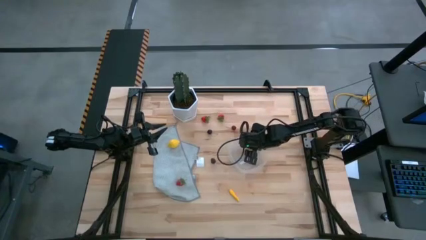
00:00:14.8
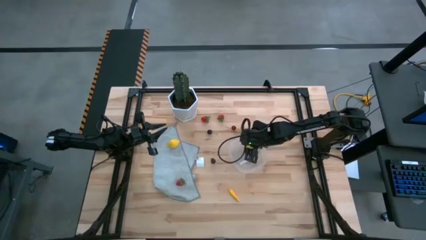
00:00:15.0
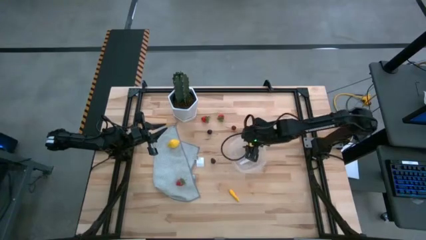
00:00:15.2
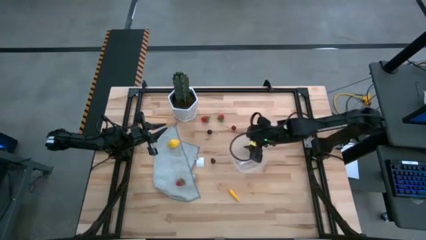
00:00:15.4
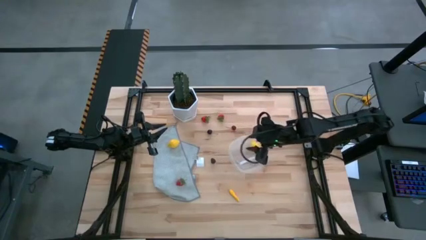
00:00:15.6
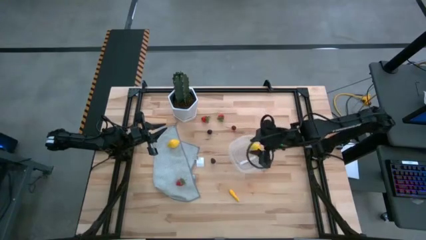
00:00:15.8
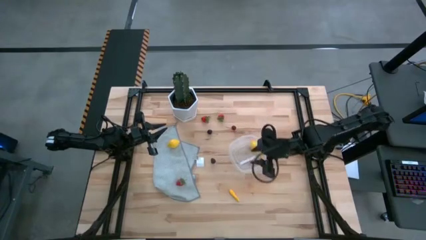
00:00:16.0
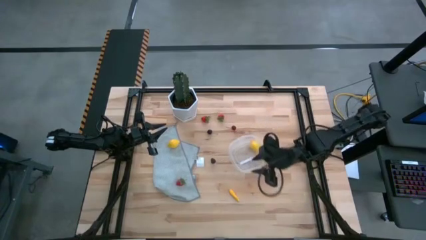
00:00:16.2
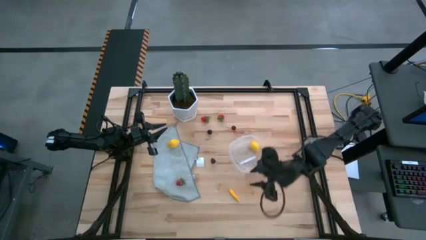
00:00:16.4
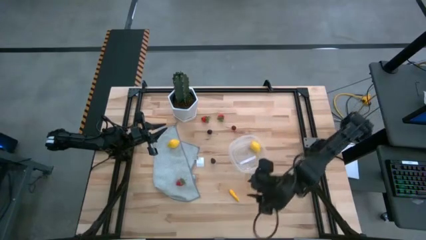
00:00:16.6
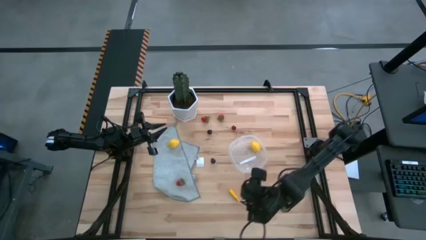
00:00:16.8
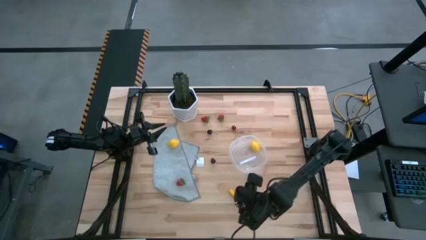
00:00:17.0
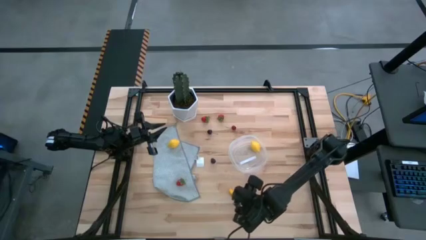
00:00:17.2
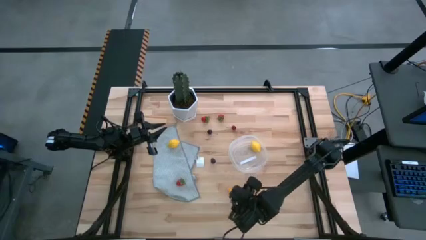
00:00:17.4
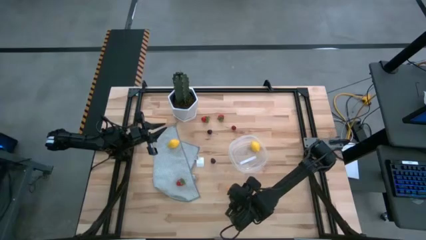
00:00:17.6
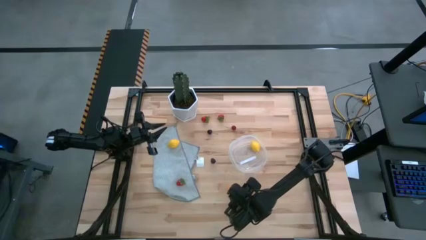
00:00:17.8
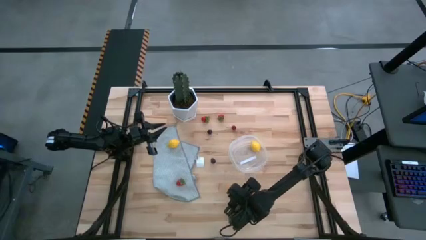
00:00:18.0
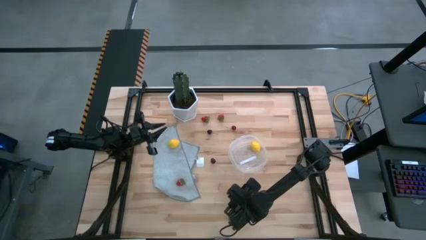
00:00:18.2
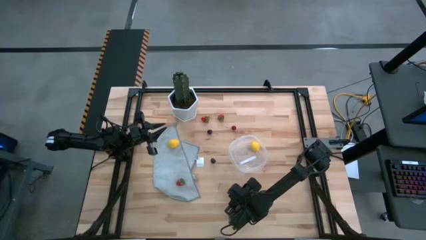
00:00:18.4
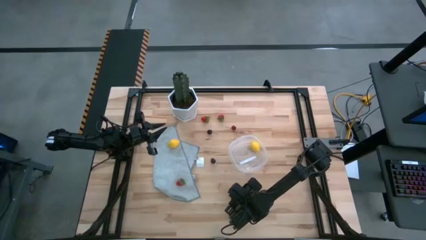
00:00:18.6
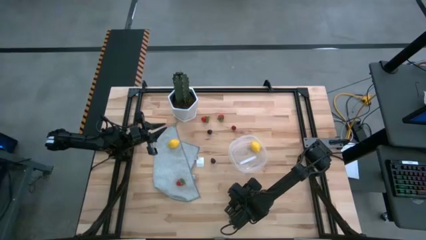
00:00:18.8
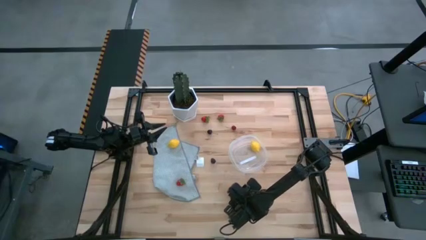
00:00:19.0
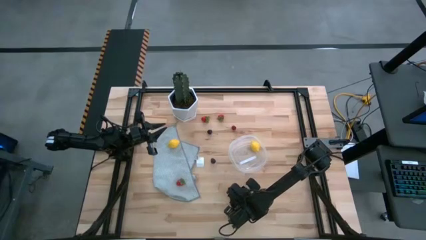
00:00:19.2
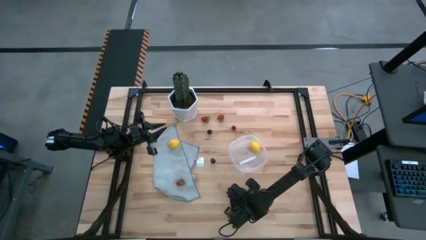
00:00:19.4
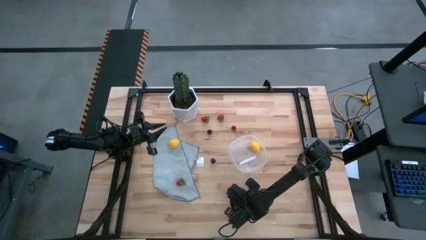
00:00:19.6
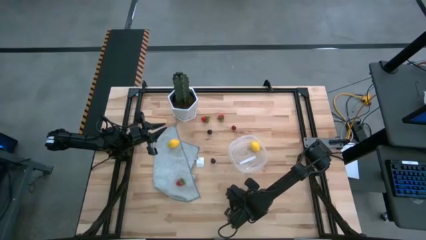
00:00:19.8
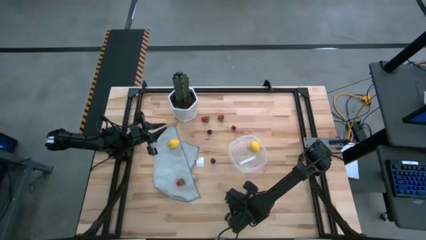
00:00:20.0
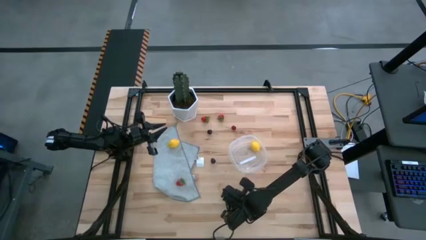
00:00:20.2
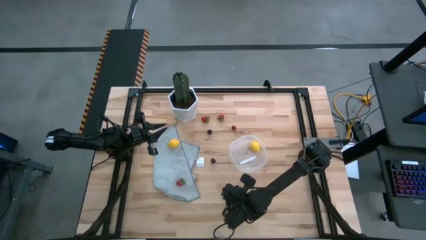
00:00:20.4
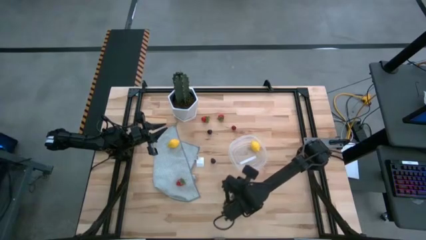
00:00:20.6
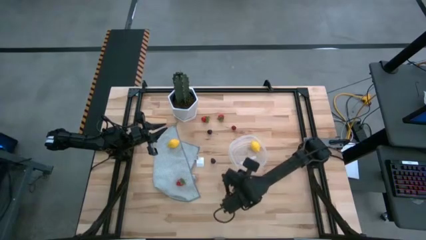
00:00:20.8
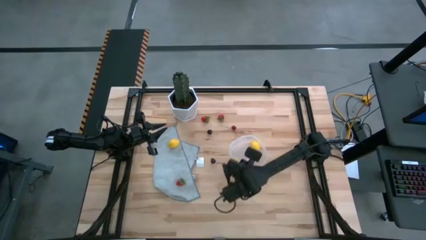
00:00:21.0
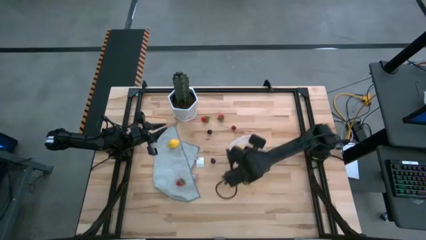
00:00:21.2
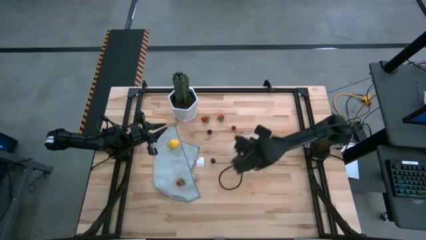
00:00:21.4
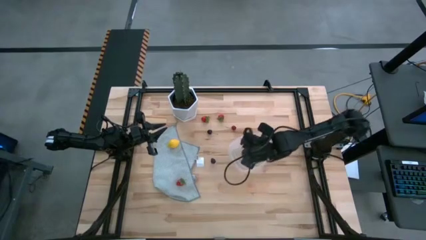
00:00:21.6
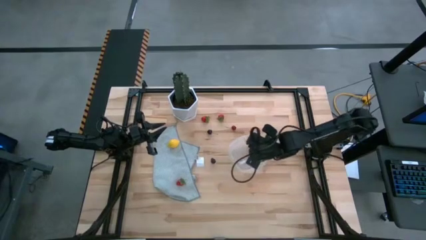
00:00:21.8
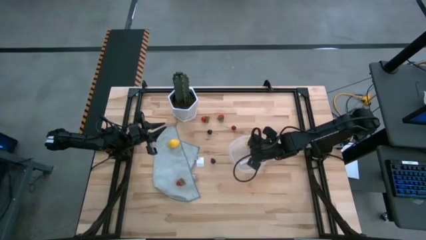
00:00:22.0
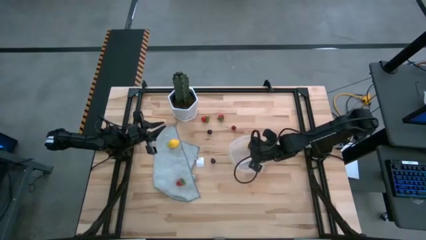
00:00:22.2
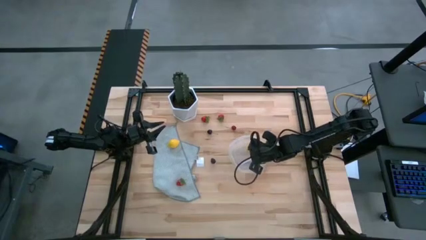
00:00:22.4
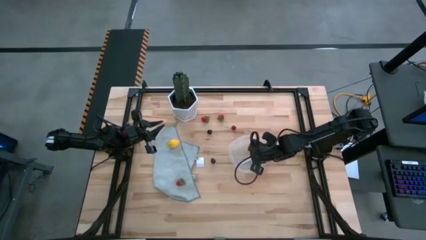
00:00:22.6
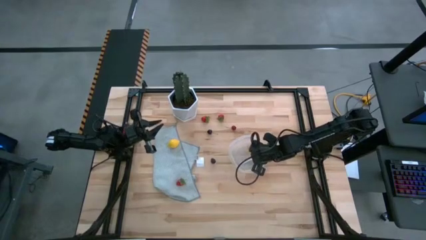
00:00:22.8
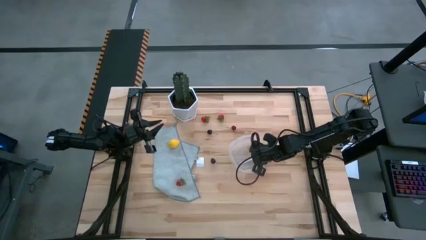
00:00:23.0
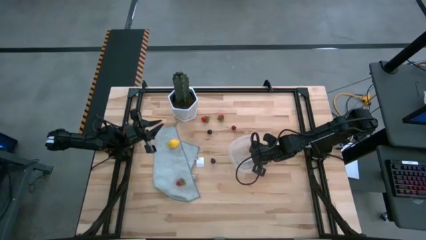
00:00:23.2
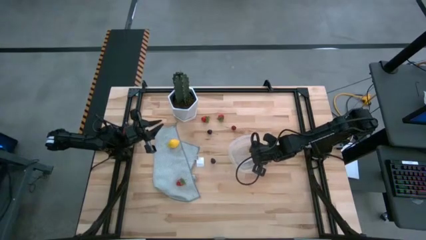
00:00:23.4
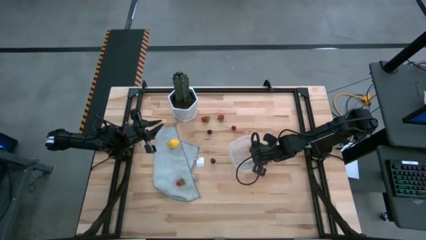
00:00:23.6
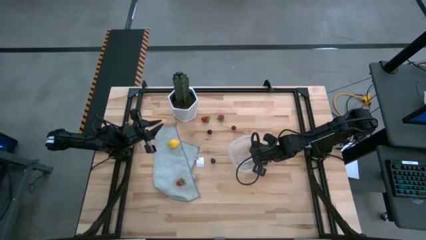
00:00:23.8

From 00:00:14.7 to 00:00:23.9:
Task: Pick and placing Produce into tupperware
Put the yellow corn into the transparent container

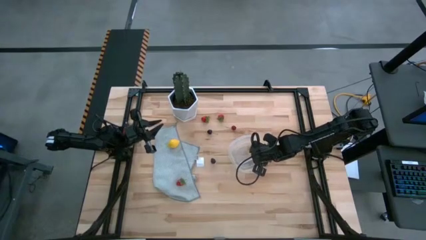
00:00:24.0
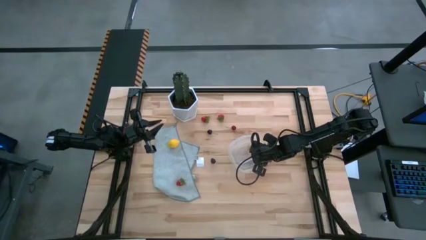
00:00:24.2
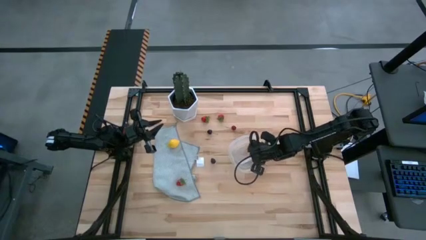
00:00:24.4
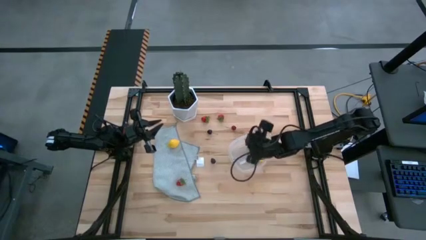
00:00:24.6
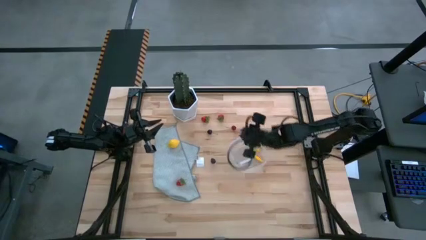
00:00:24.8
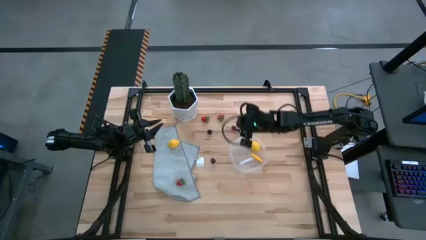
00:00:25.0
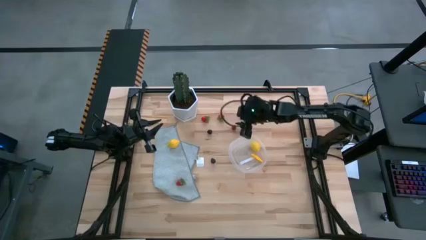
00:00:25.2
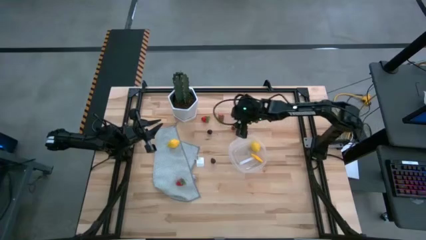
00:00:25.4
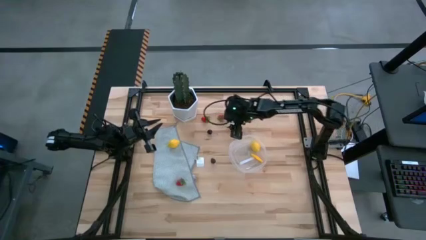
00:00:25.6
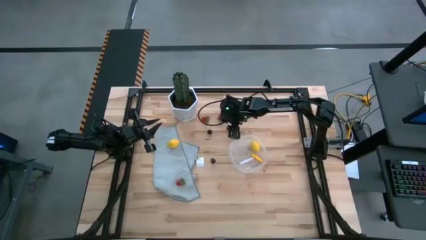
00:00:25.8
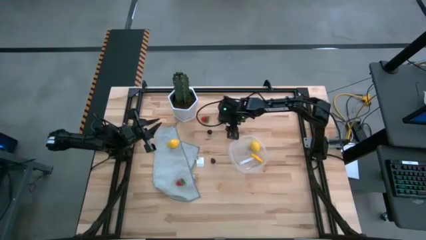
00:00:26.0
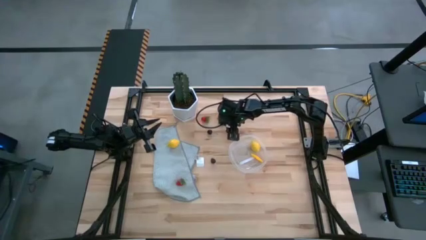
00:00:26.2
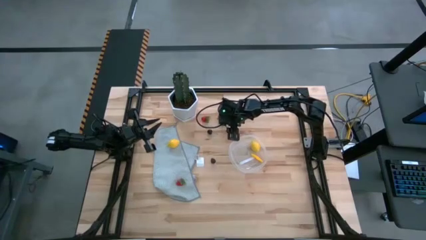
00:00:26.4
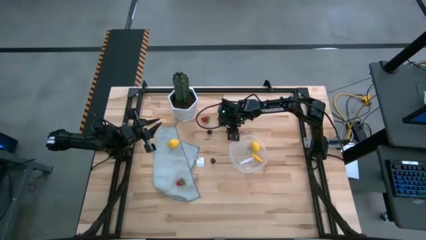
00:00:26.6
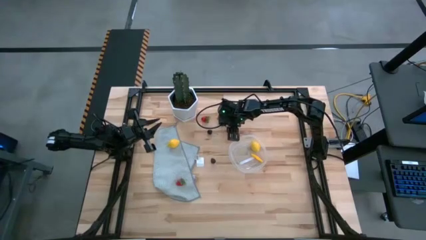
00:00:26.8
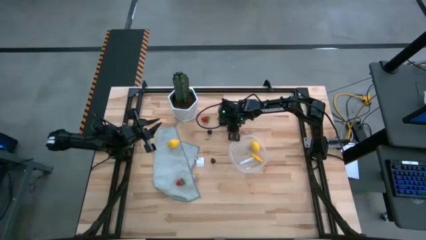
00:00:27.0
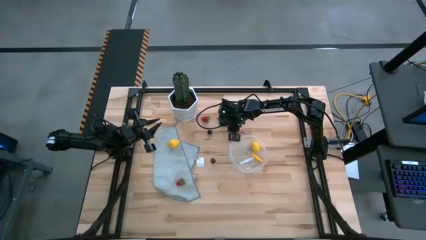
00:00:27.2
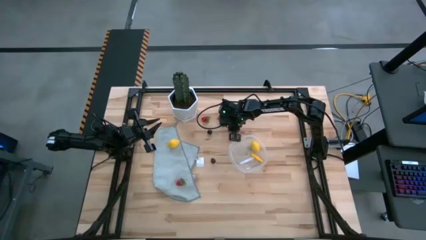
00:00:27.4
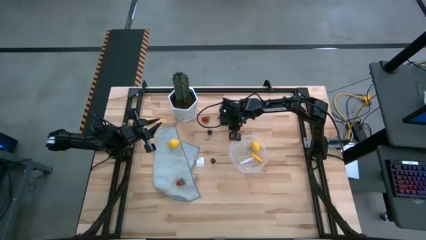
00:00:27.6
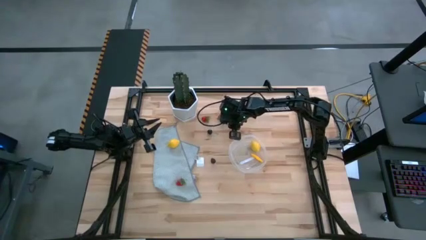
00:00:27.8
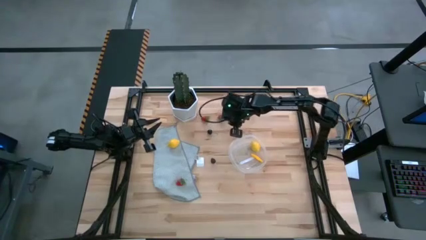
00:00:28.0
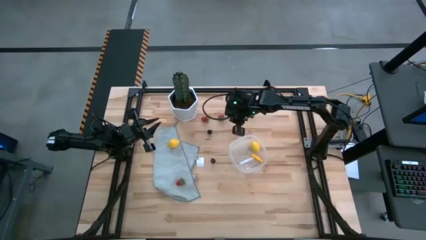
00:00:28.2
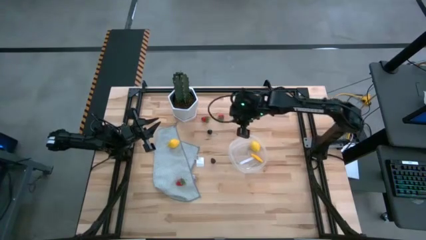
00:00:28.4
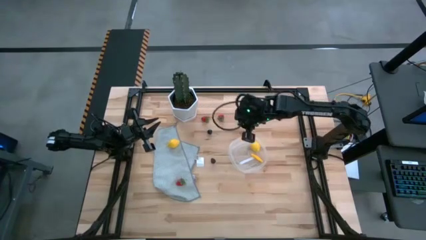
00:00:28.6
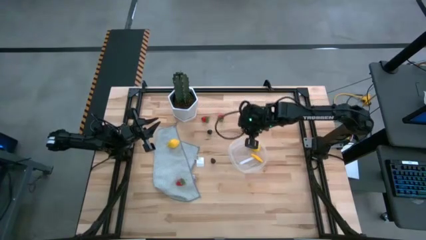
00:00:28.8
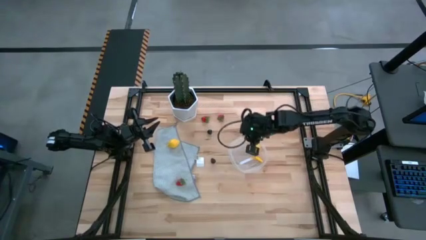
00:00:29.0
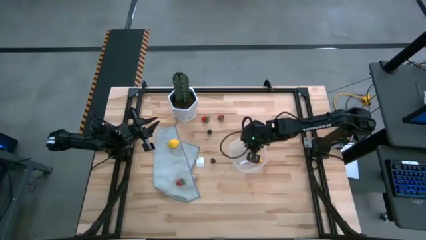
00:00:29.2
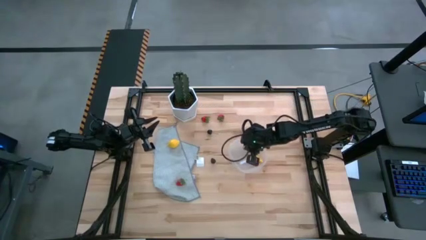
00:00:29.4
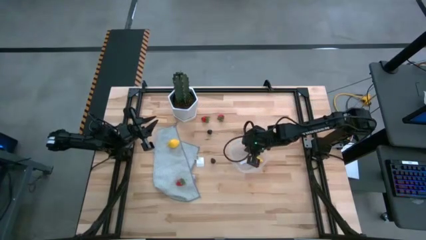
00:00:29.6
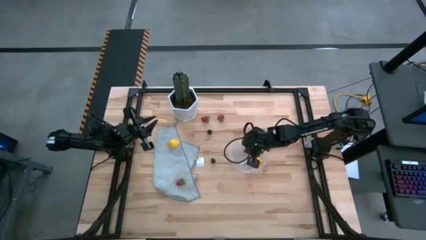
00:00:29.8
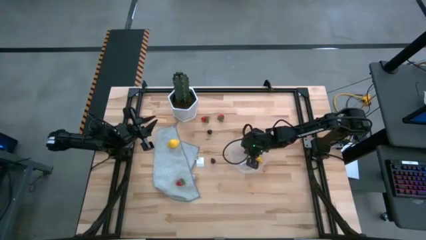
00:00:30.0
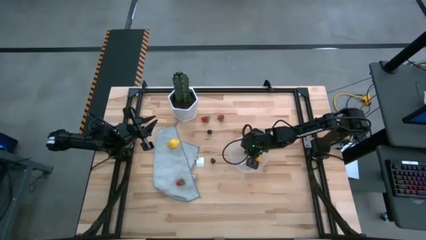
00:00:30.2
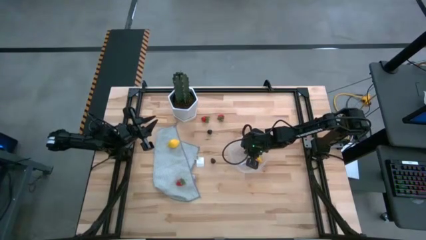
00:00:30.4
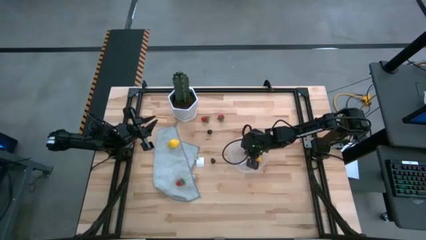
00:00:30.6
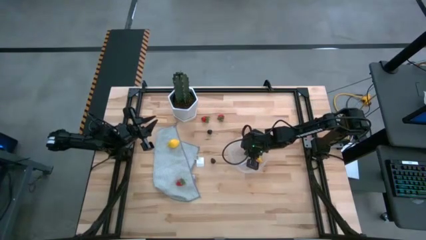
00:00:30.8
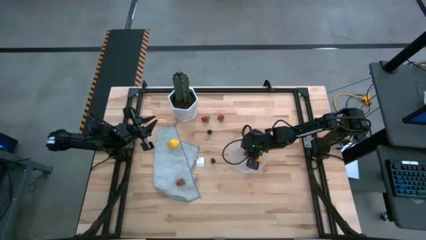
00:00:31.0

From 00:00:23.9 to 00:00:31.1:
Put the red cherry into the transparent container
